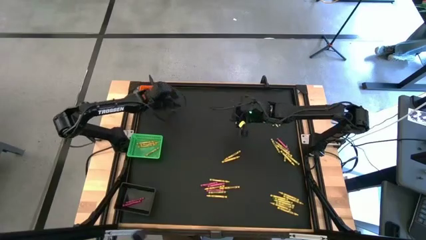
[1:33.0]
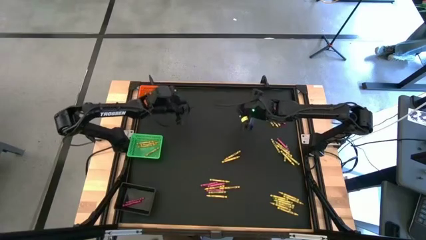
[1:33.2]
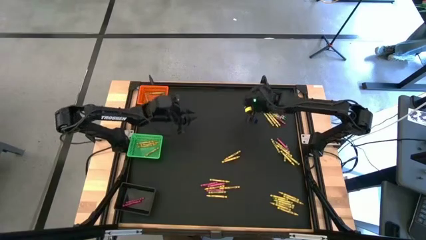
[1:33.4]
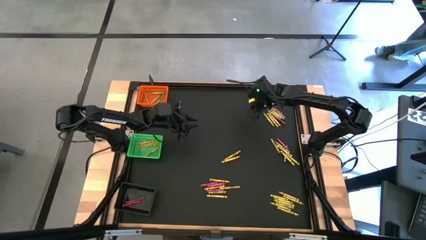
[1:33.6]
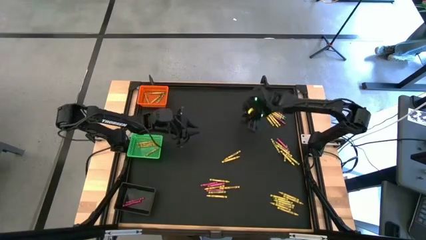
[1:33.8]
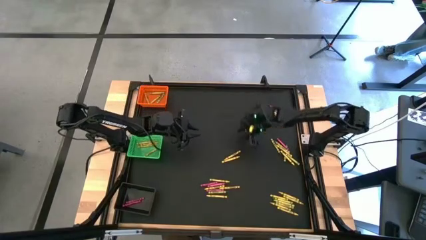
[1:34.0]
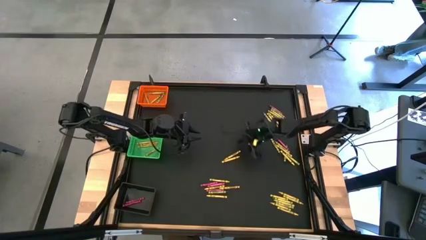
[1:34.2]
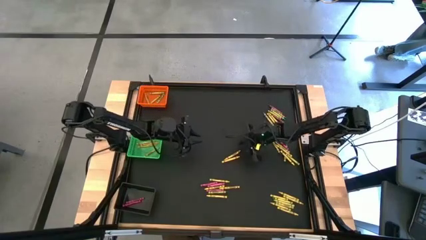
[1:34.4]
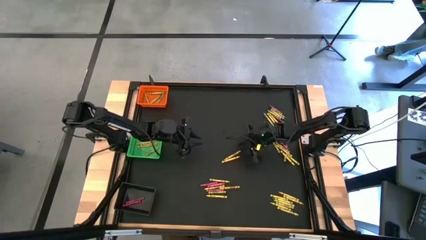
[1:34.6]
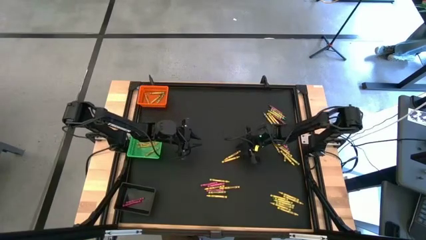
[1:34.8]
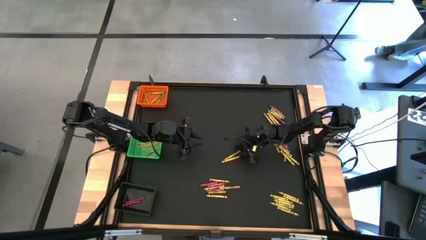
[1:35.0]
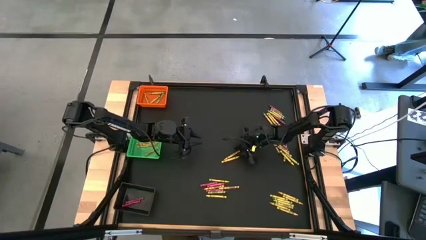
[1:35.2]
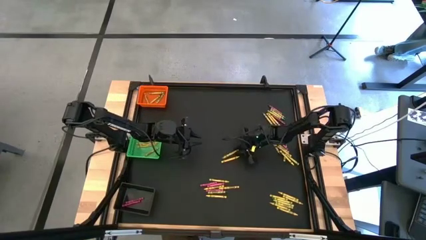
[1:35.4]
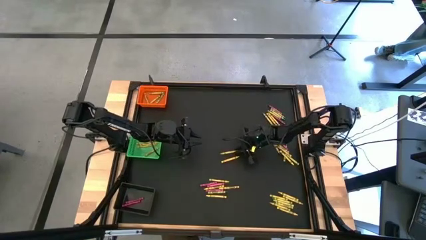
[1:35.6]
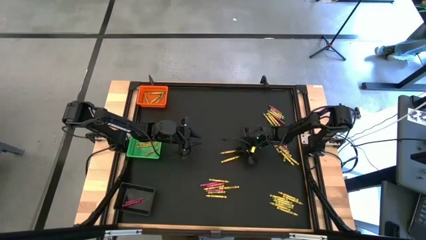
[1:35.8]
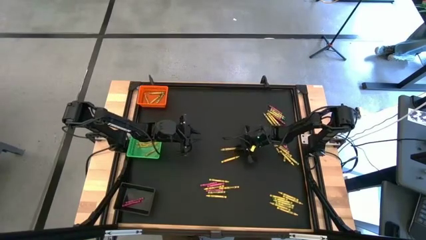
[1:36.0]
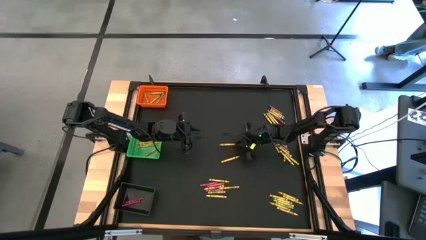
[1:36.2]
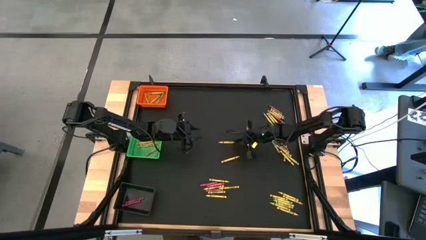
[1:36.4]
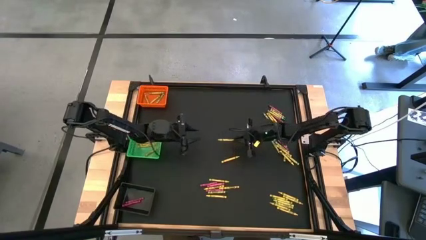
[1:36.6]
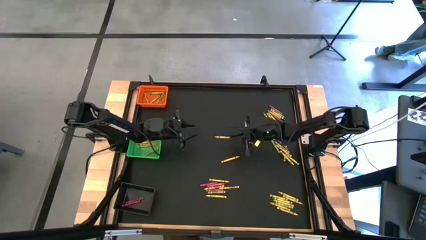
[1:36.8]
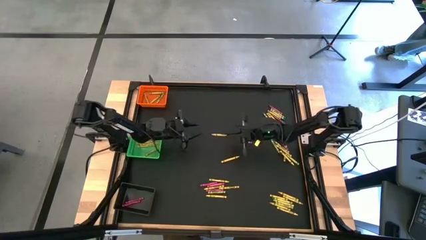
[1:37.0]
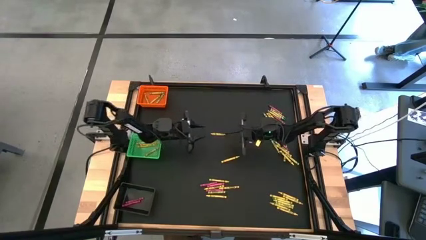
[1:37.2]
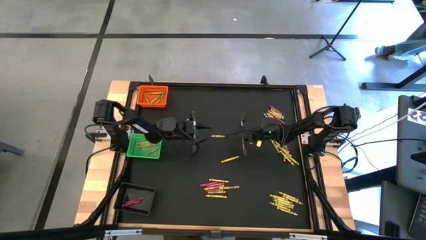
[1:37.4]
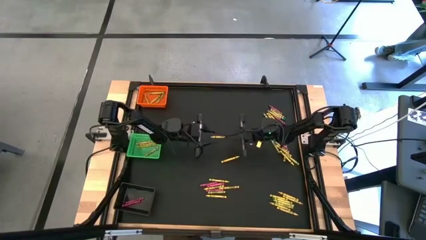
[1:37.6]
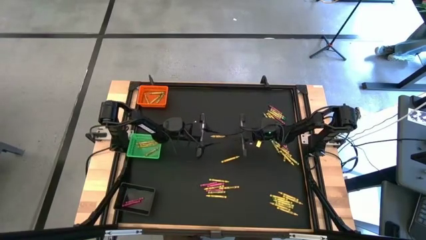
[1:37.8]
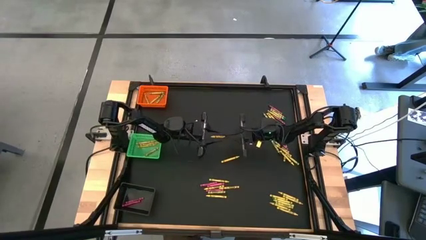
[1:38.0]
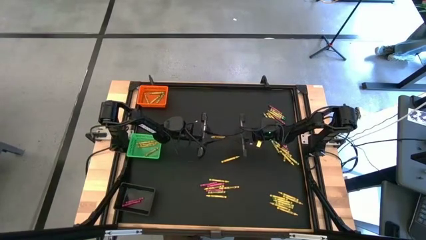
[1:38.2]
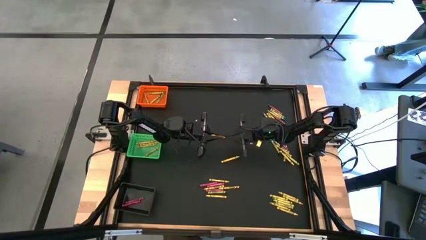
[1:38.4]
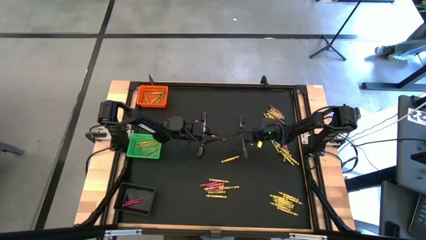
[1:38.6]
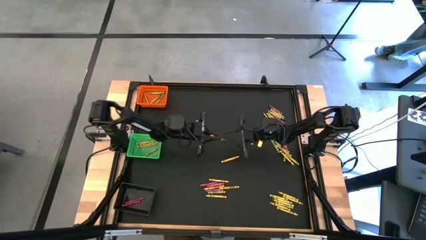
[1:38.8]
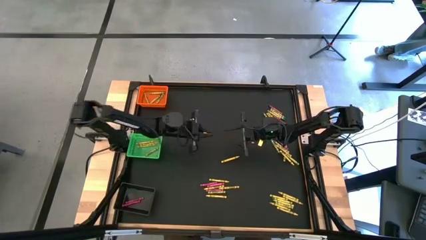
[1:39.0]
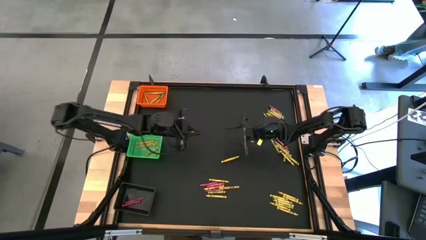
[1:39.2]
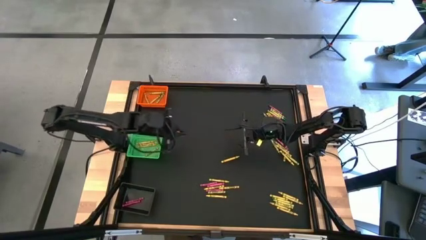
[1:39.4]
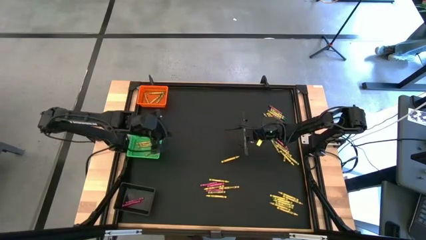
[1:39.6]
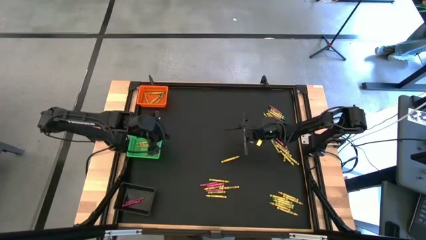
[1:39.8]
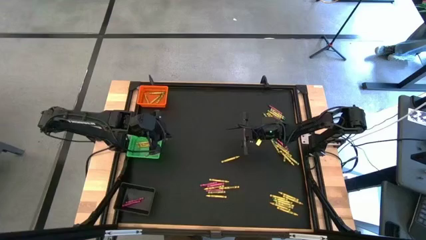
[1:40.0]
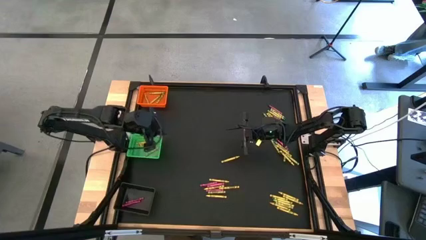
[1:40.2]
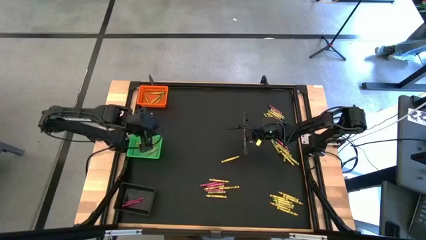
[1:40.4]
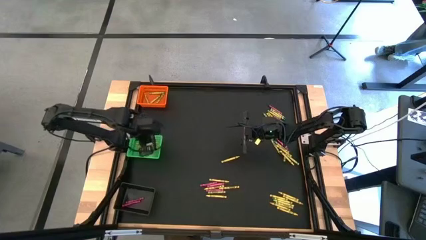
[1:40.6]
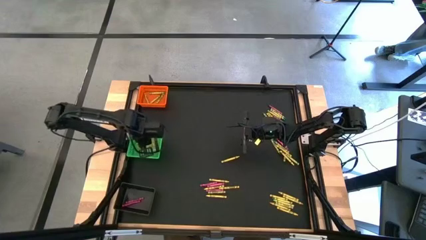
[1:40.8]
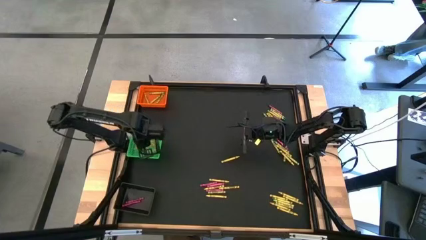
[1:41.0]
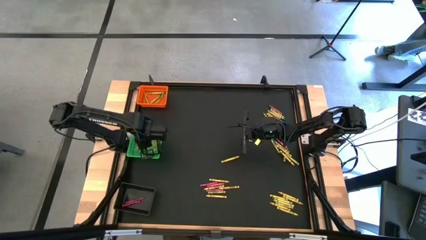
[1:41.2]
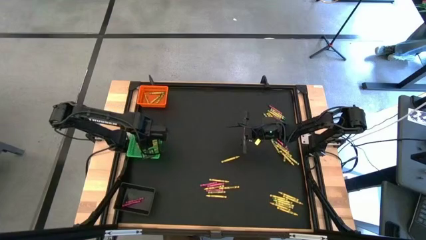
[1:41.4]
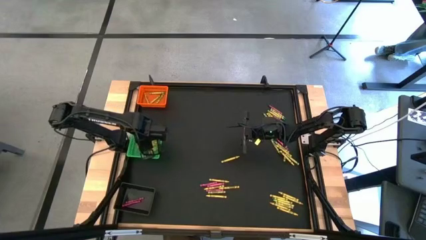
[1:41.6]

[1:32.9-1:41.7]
Task: Sort crayons
Put the yellow crayon into the green bin

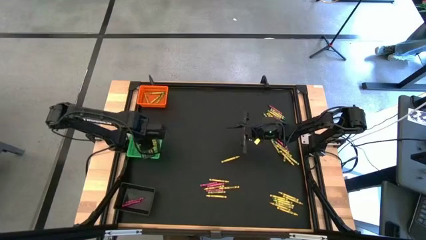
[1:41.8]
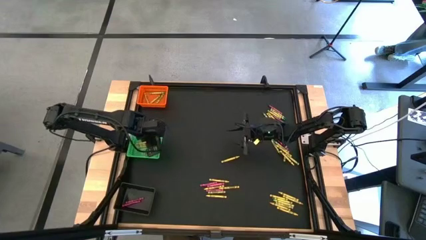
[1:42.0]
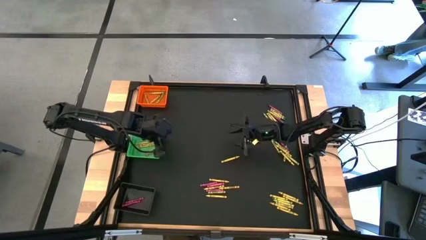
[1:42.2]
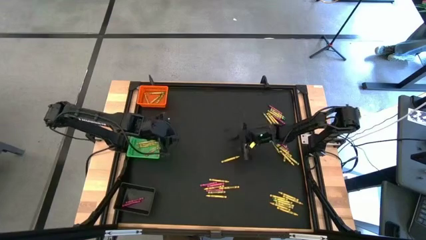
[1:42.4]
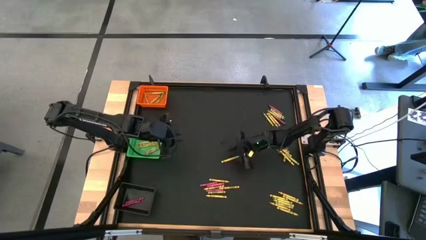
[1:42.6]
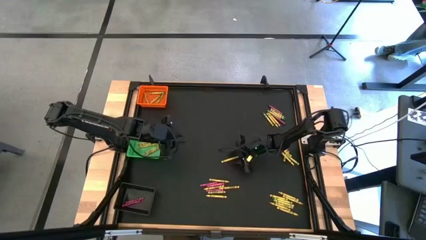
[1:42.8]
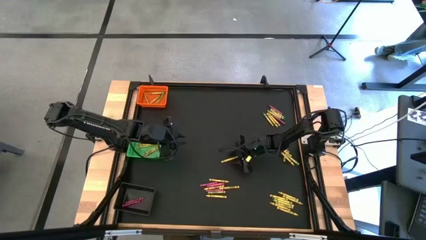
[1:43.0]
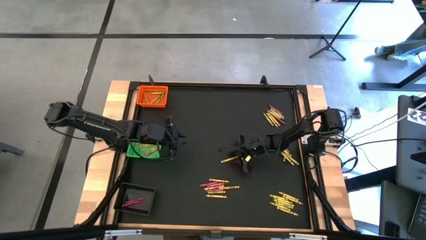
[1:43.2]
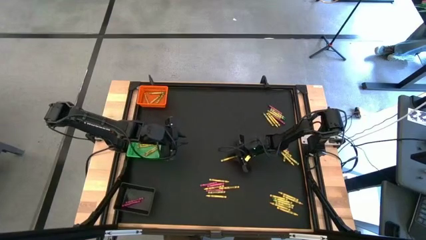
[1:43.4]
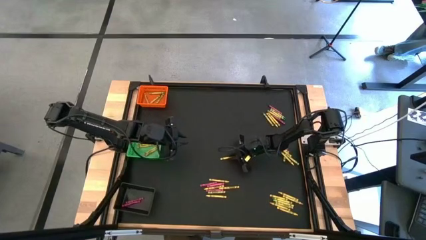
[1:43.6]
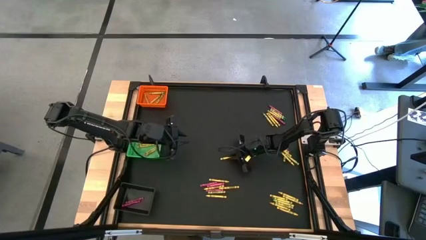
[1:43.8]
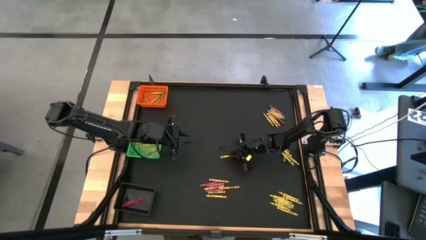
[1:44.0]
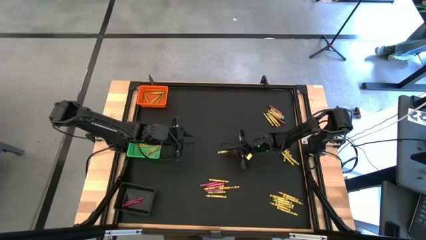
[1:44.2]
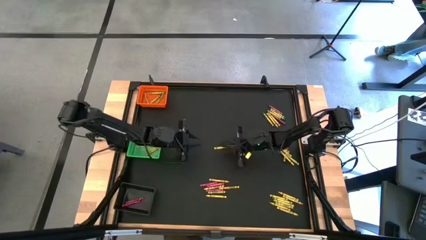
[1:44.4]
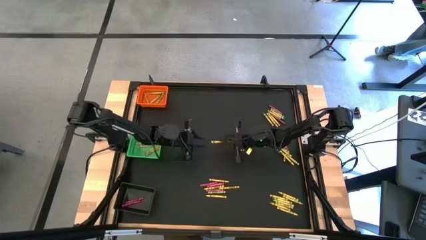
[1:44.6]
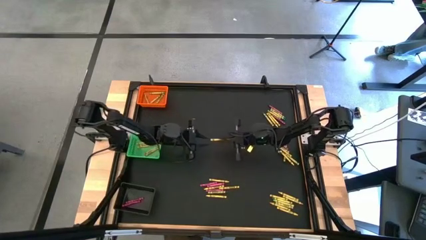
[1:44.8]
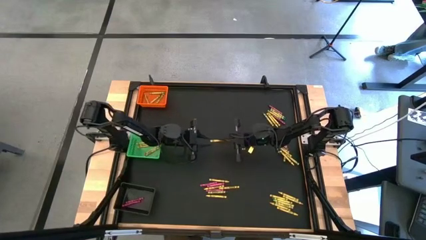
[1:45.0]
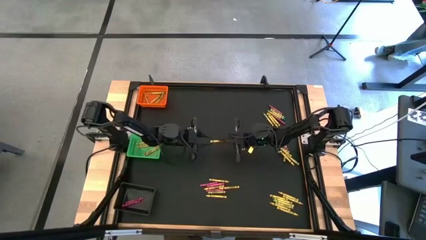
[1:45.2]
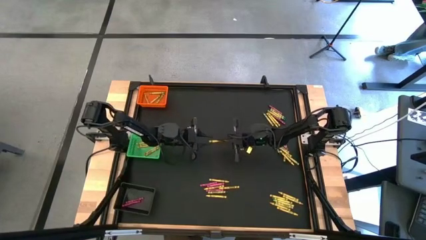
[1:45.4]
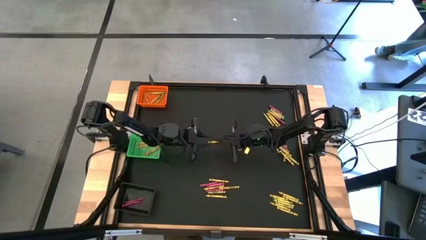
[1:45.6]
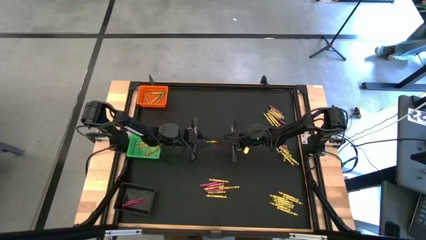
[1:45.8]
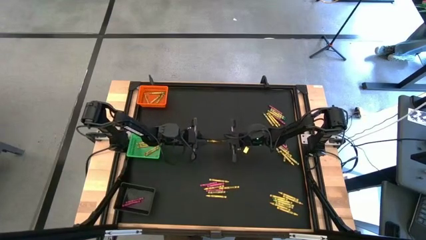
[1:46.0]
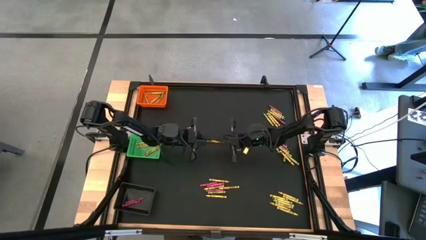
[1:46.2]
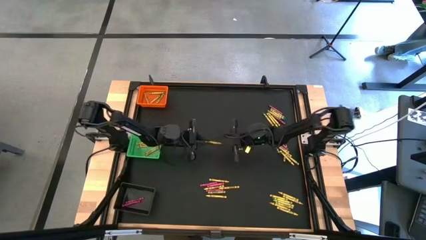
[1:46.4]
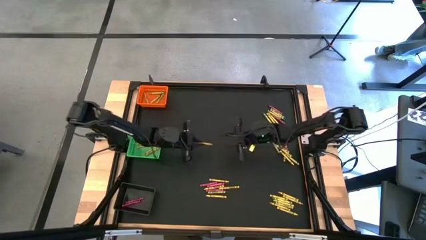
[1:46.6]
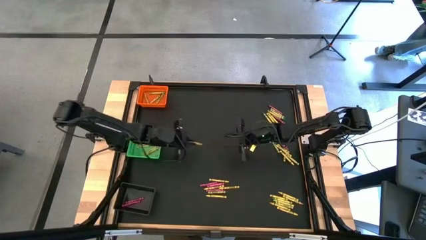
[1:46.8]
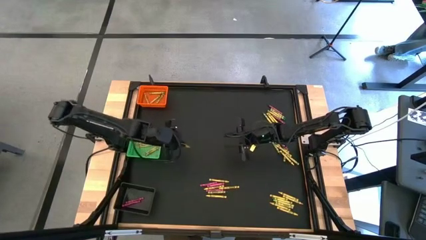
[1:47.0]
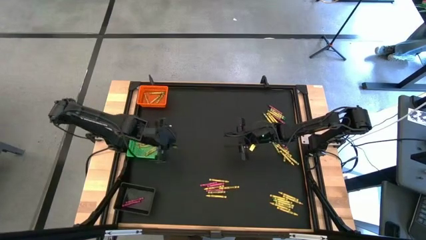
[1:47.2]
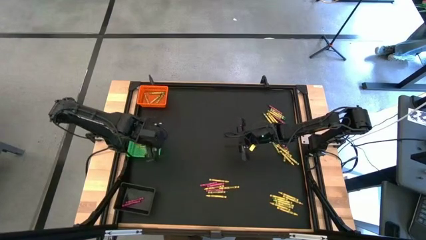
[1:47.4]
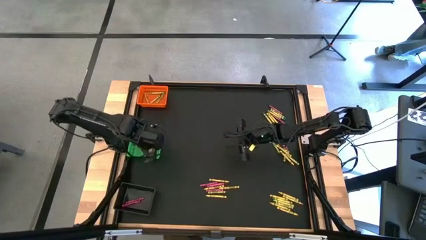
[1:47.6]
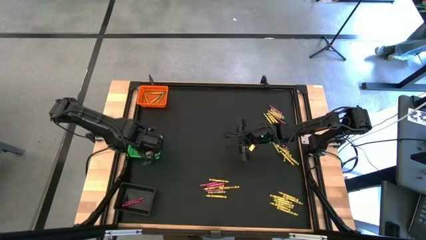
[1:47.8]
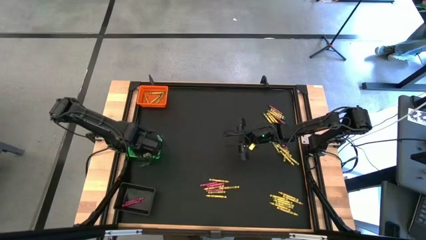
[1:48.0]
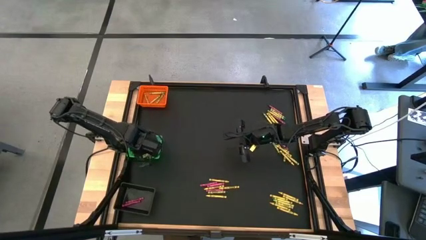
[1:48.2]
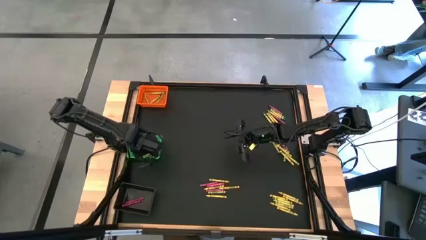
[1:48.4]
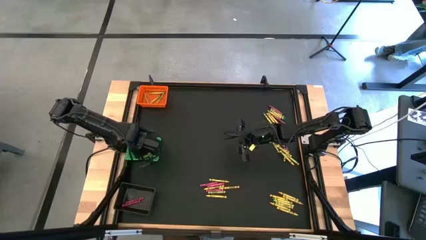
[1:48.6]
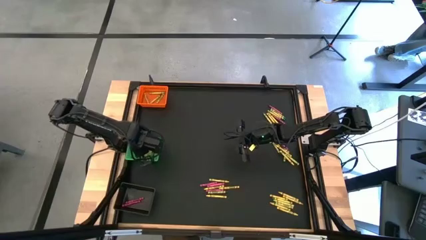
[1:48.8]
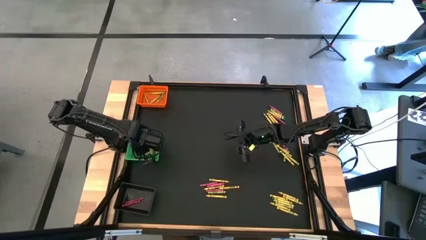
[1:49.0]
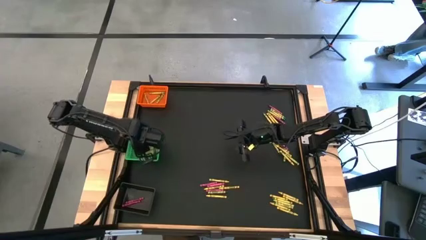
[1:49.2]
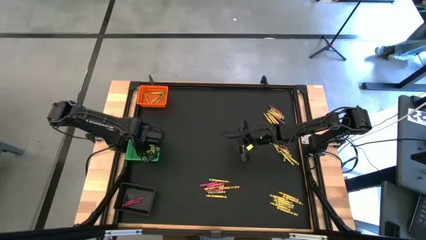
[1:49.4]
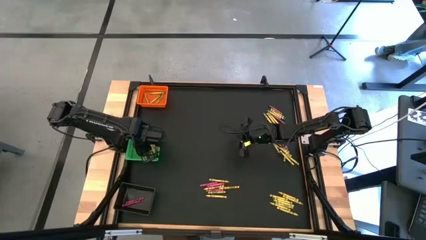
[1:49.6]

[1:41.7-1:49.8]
Put the yellow crayon into the green bin
